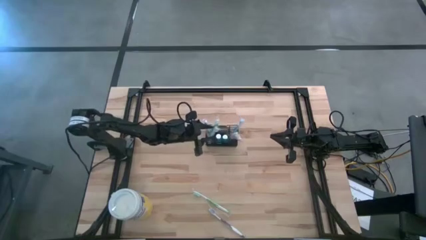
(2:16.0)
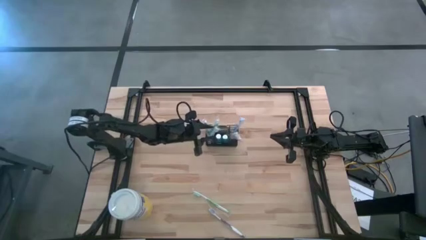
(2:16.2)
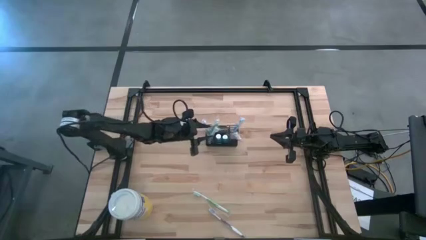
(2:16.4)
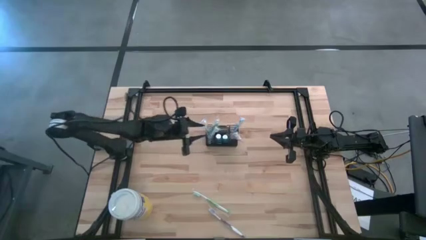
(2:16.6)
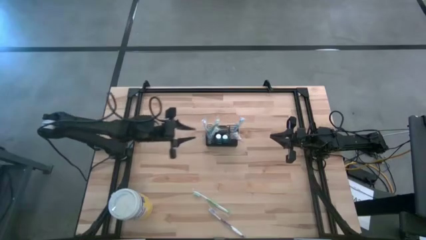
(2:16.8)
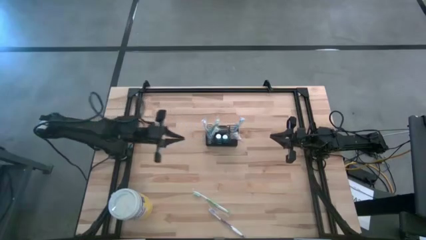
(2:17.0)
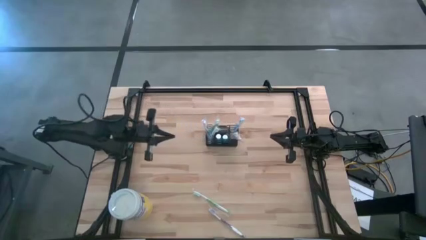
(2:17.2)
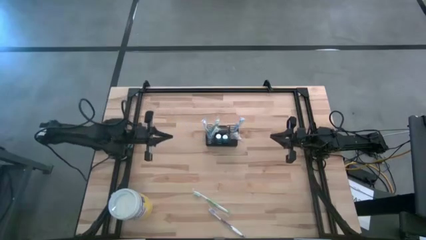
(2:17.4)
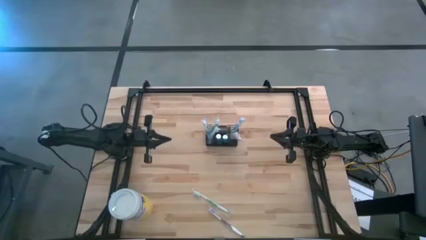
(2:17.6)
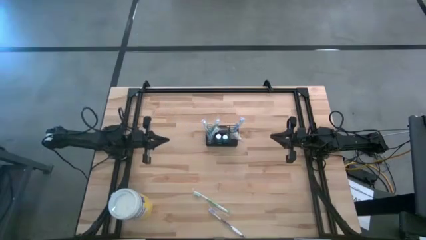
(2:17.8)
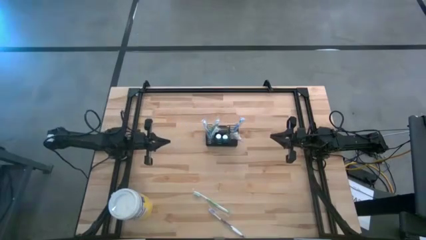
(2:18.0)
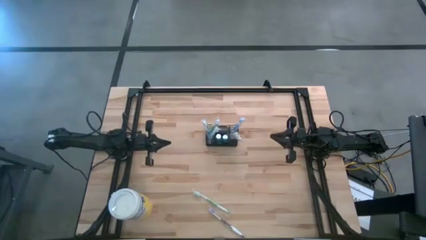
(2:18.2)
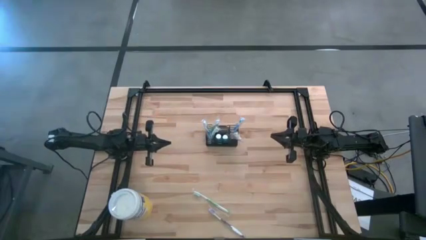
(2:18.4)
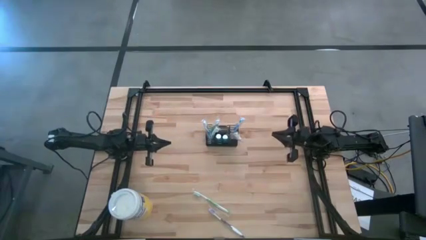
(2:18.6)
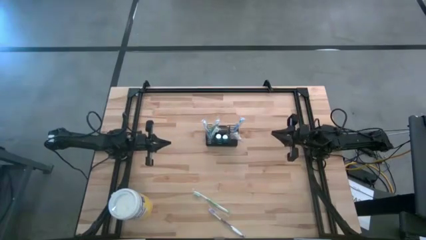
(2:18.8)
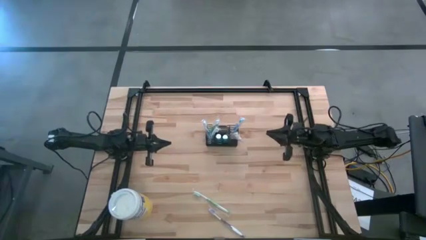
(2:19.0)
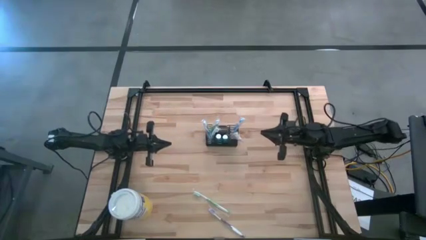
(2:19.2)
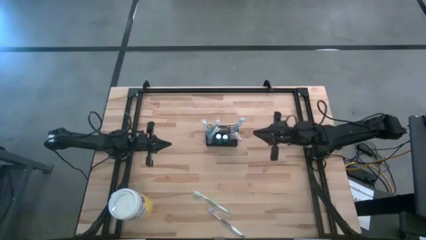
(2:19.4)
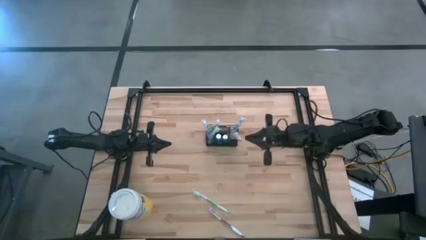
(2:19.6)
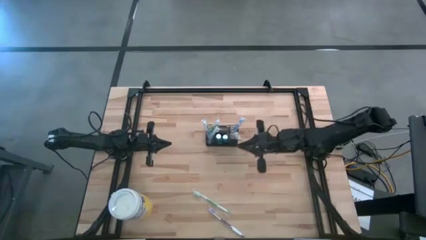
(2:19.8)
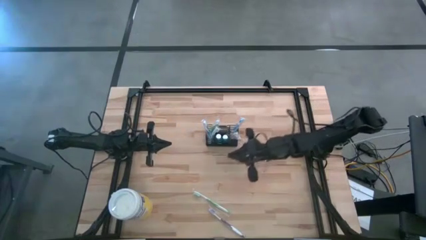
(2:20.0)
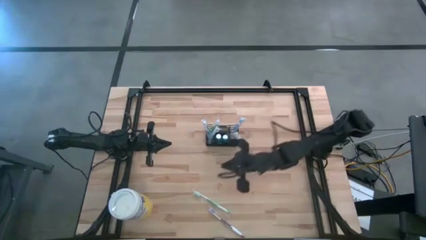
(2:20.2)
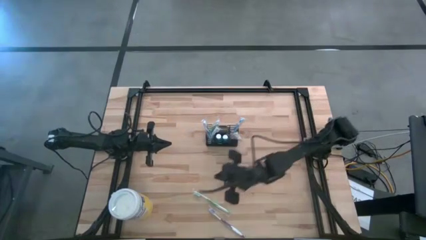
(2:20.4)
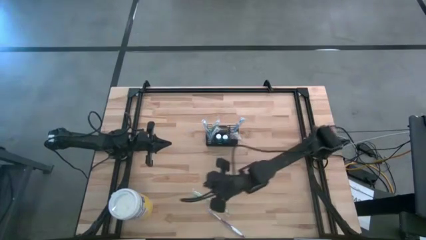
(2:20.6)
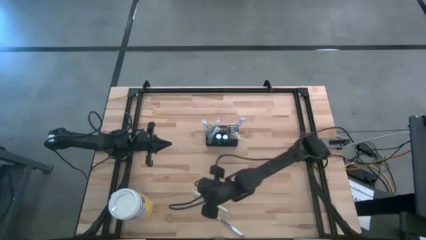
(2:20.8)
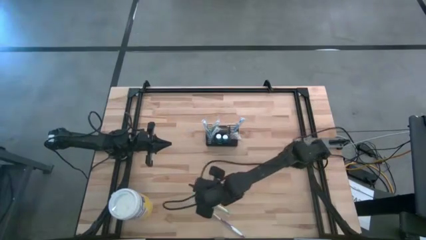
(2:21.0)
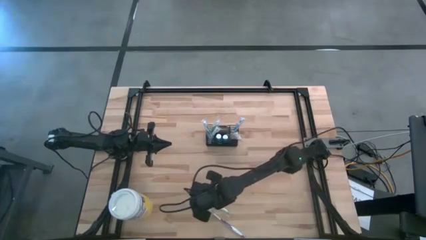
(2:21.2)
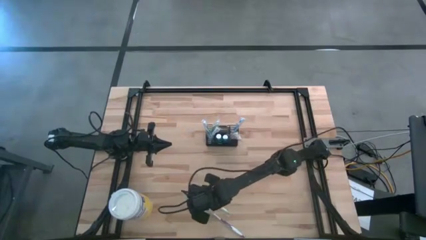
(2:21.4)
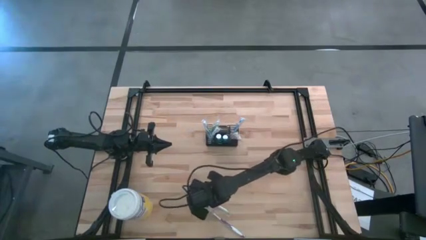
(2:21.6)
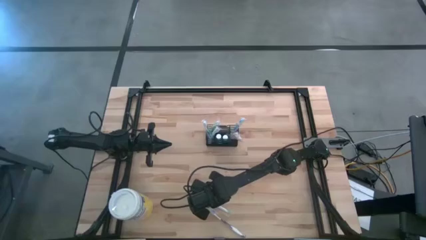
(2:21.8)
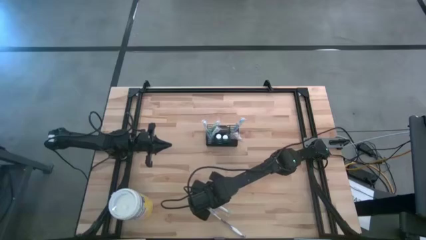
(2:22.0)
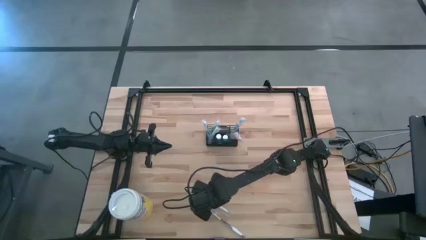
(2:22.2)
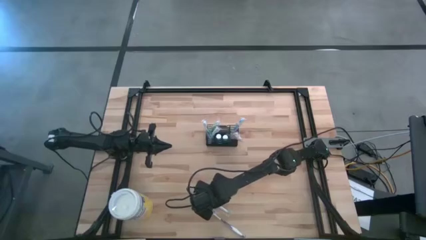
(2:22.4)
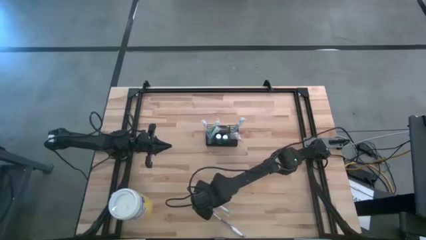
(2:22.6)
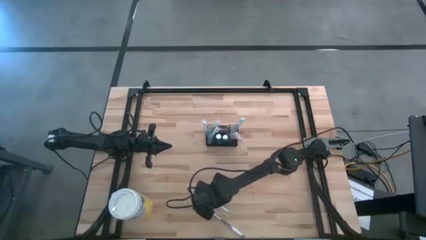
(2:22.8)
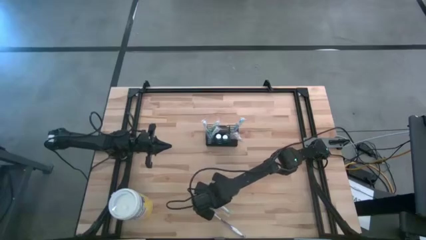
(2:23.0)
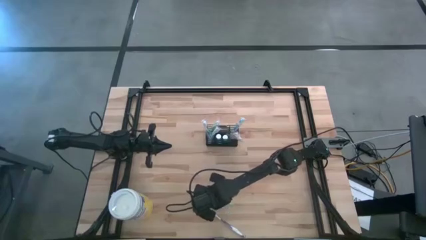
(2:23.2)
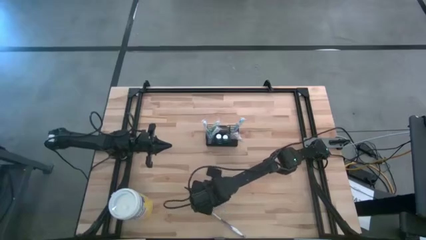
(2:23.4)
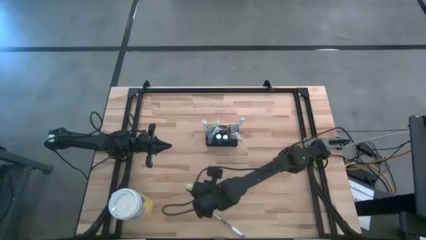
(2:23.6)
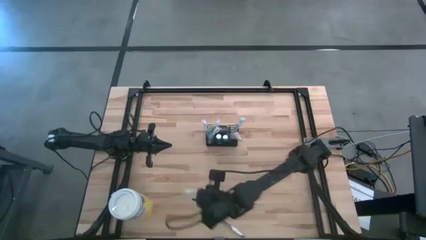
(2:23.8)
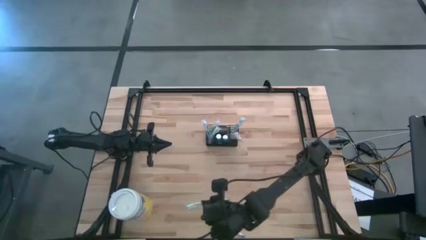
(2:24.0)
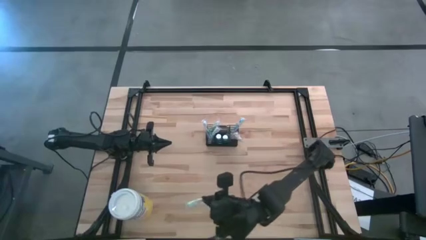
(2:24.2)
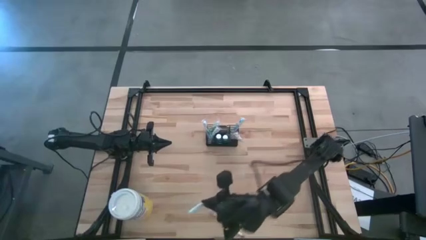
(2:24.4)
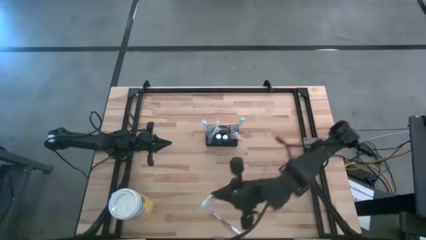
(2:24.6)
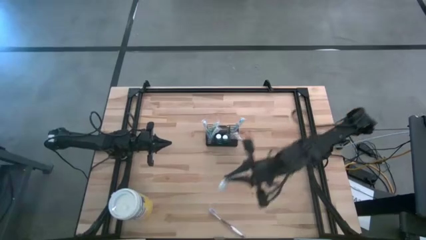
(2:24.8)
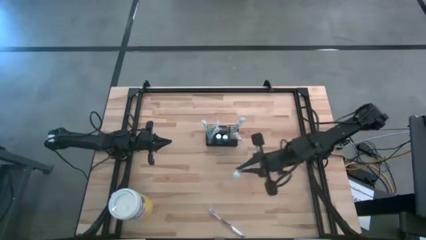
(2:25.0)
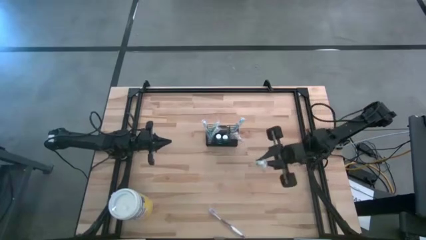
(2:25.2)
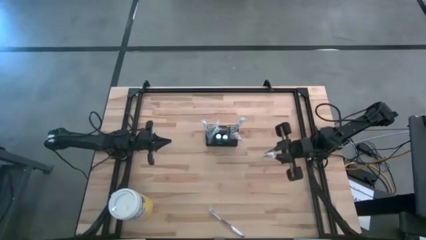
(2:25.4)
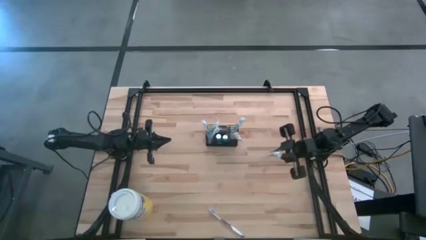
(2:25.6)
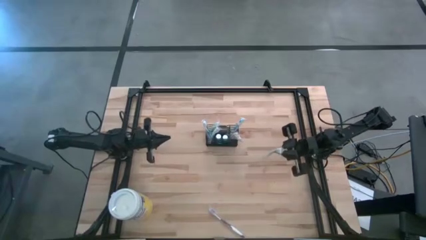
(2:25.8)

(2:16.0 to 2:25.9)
Task: Pick & Place toothbrushing station
Put the green toothbrush into the wire organizer

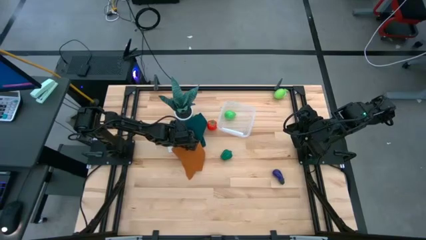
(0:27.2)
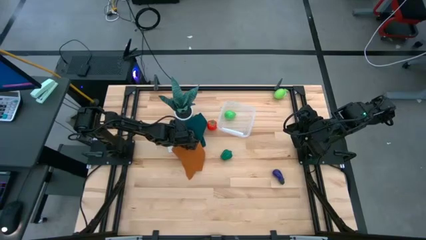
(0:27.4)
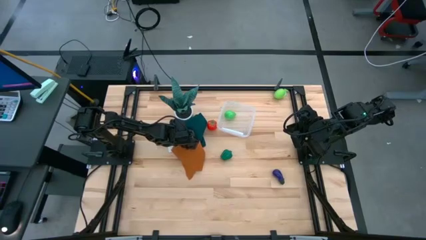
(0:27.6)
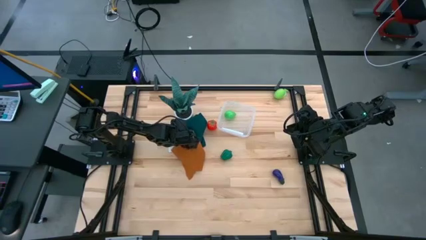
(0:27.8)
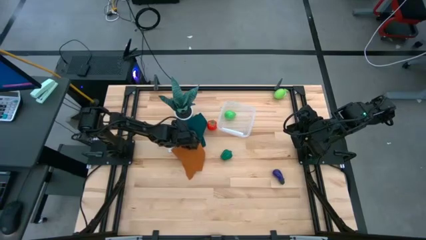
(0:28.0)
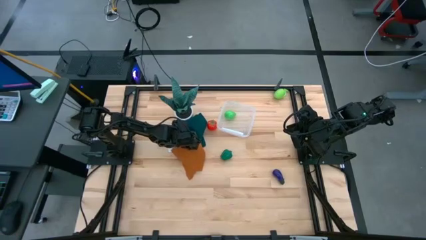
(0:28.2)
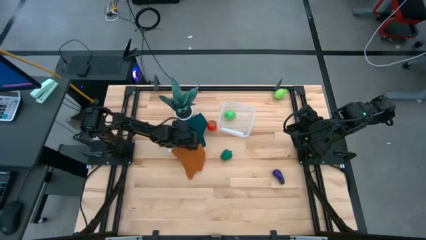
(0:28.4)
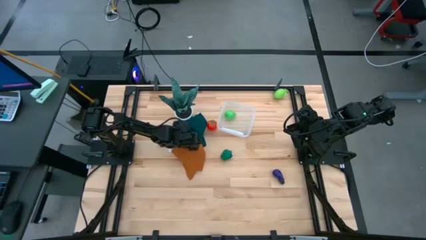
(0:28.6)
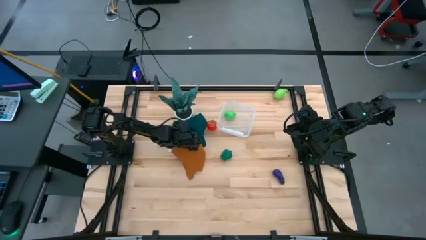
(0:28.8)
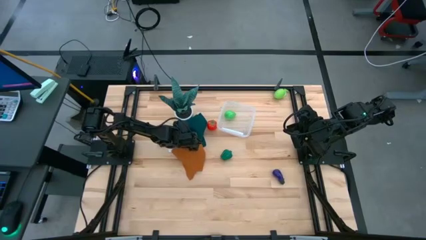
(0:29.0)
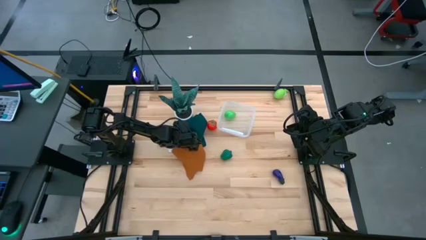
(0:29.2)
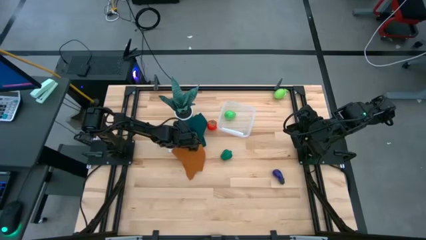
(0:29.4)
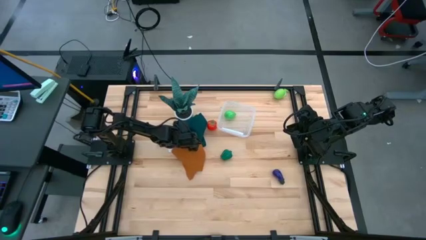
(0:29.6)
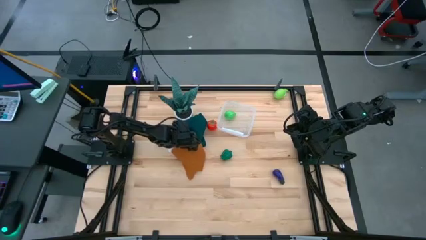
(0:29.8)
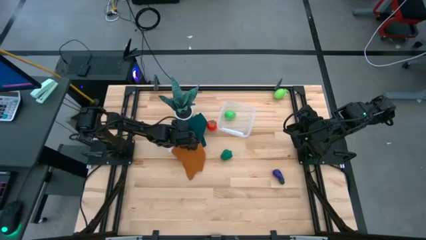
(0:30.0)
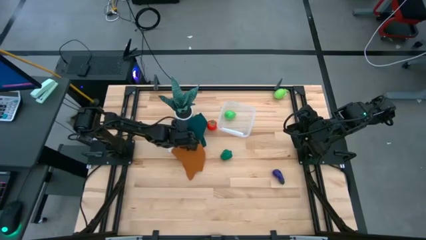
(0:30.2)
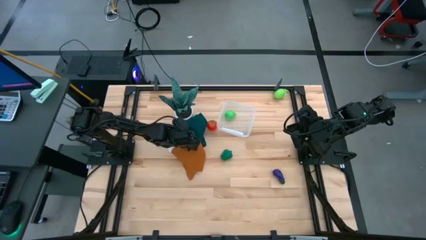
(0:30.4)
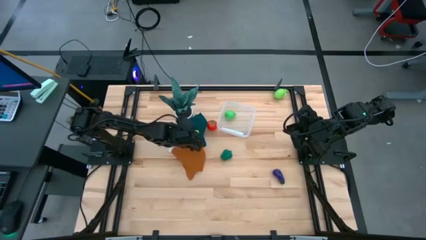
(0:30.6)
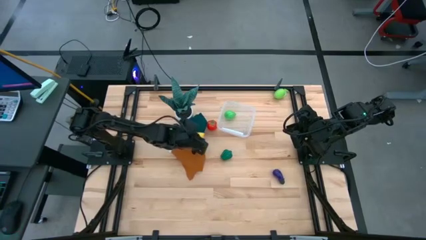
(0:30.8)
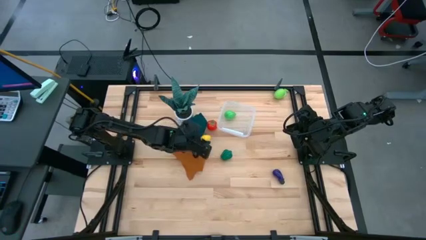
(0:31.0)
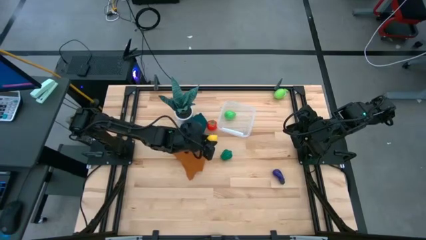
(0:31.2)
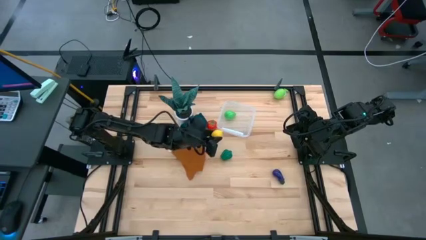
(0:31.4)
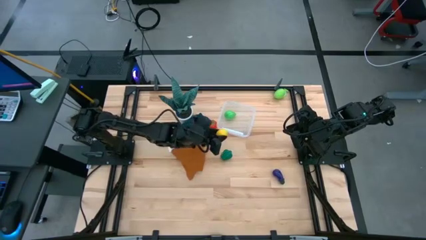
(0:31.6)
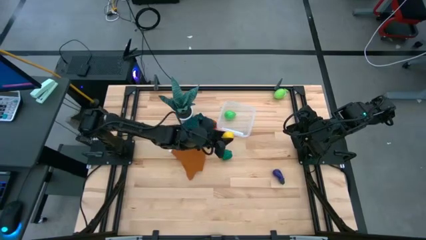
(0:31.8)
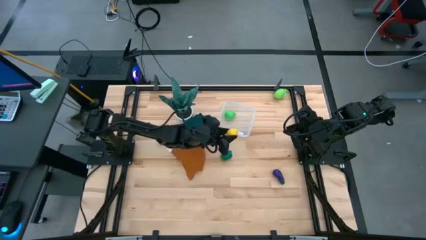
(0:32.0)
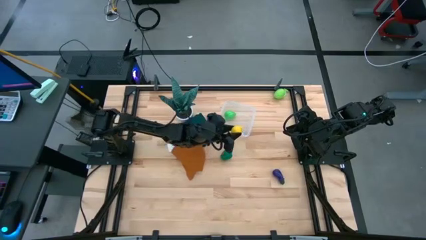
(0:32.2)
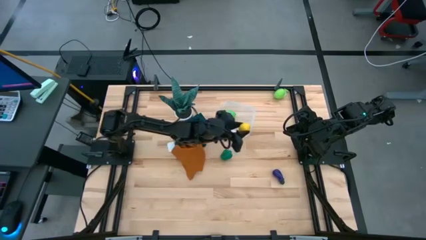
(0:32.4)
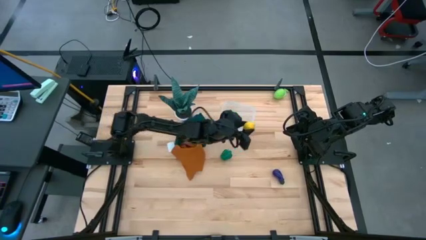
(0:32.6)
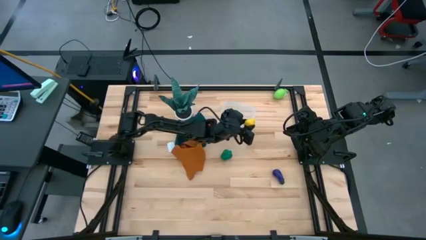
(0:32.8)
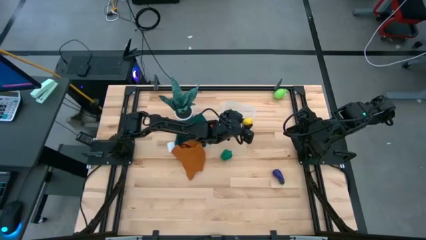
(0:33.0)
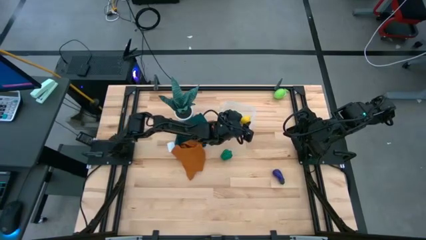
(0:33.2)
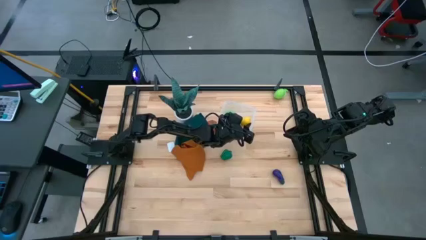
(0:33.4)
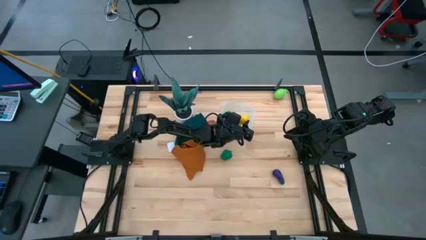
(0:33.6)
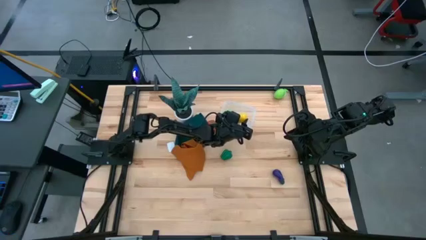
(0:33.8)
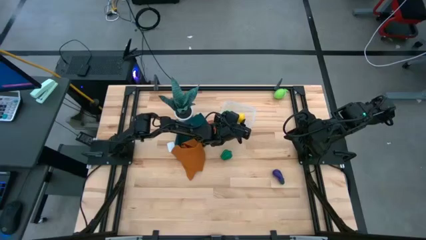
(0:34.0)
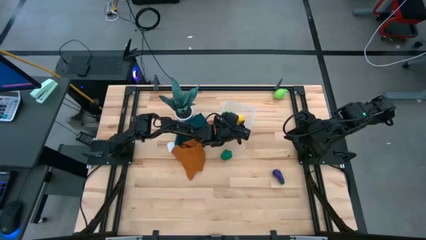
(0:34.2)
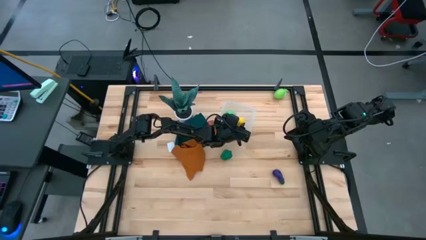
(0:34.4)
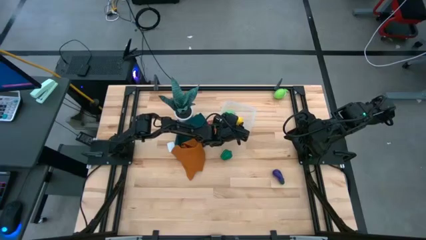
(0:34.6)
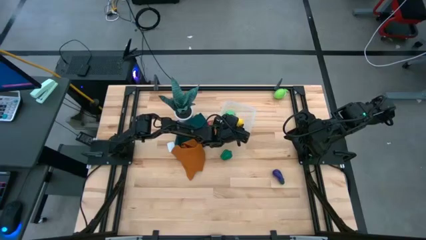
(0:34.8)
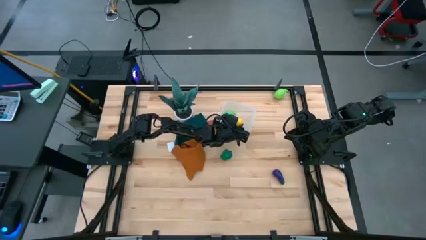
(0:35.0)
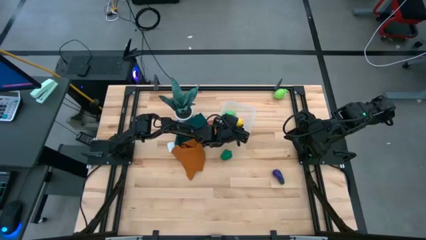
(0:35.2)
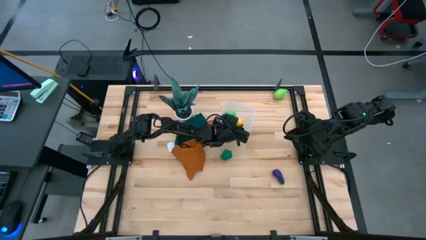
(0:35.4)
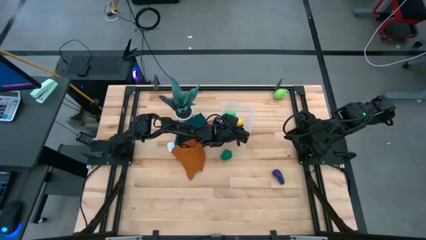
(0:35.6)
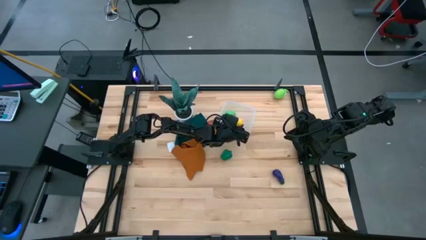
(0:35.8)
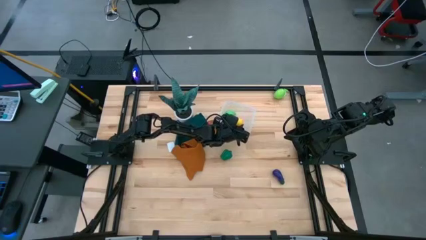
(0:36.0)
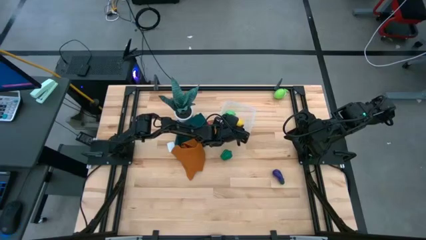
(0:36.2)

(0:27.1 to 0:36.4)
Task: Pick and placing Produce into tupperware
Put the yellow lemon into the transparent bin
